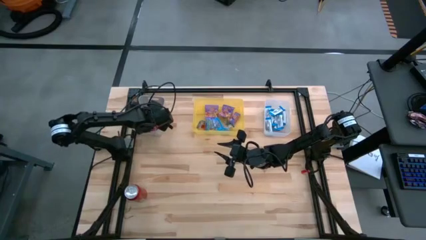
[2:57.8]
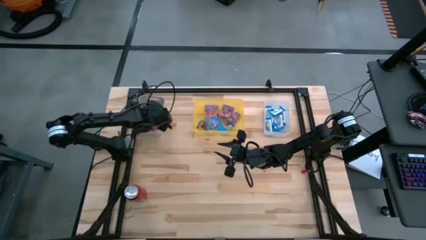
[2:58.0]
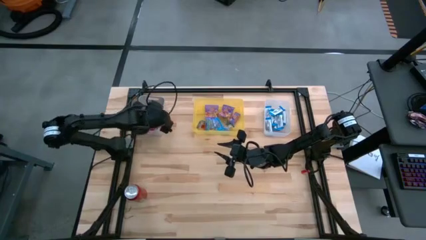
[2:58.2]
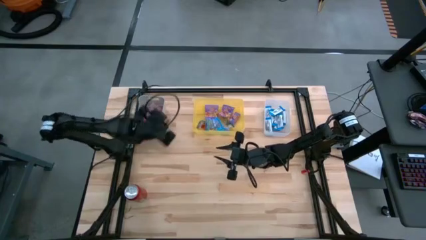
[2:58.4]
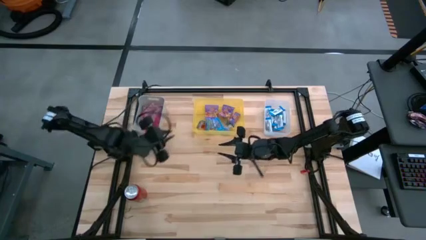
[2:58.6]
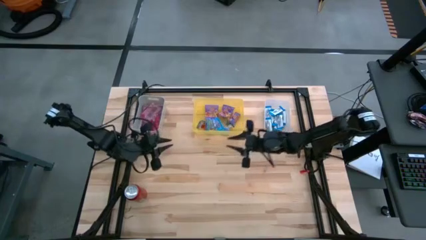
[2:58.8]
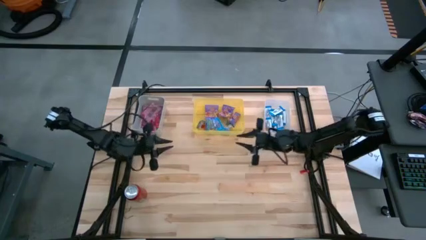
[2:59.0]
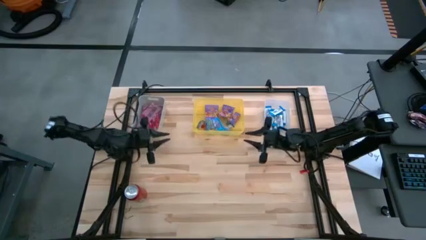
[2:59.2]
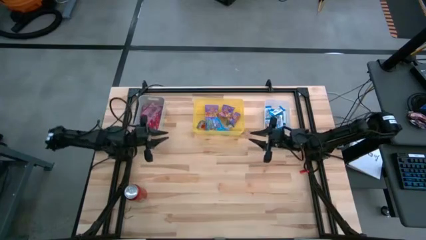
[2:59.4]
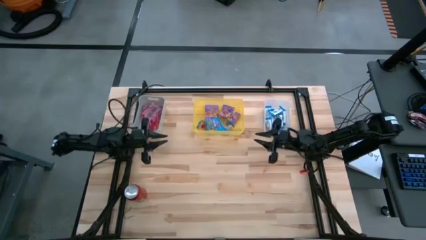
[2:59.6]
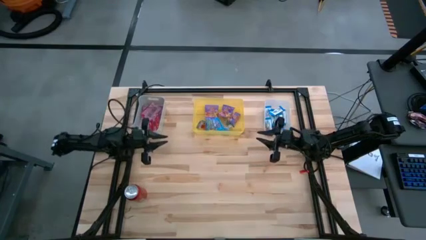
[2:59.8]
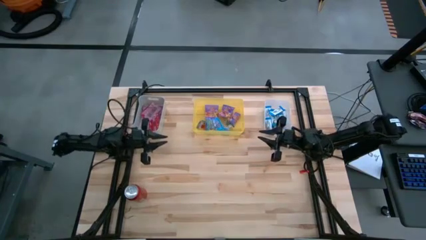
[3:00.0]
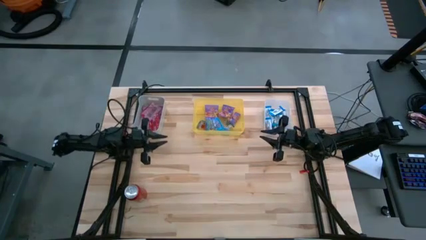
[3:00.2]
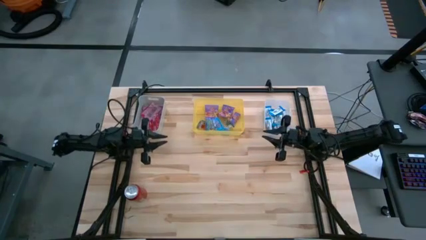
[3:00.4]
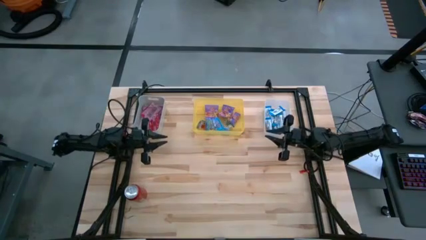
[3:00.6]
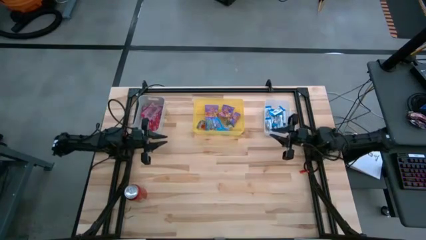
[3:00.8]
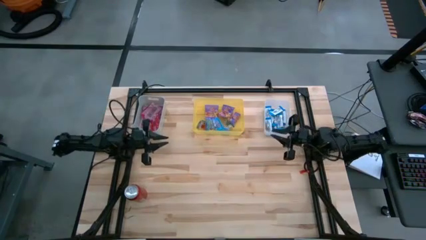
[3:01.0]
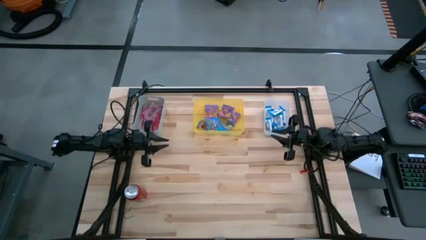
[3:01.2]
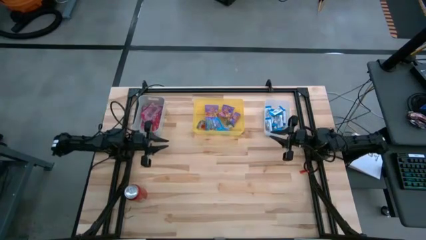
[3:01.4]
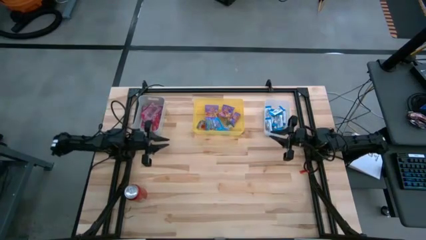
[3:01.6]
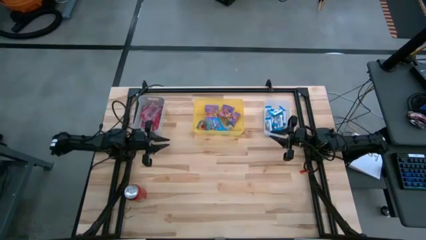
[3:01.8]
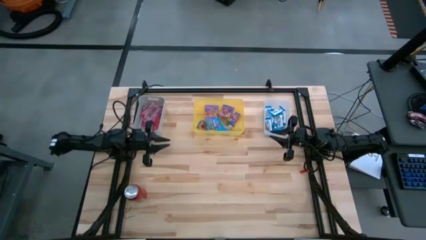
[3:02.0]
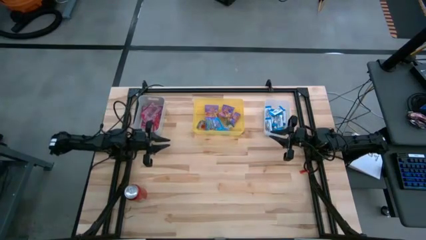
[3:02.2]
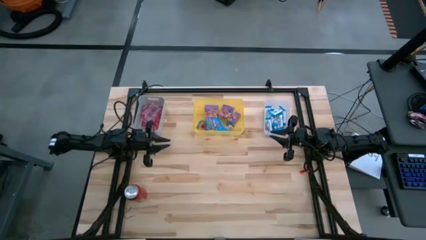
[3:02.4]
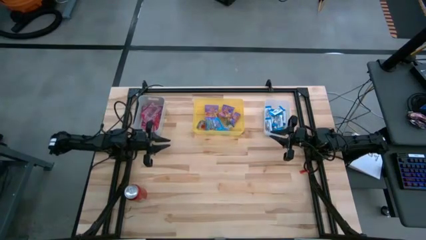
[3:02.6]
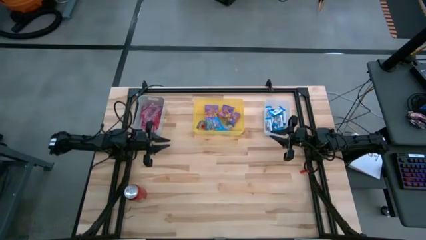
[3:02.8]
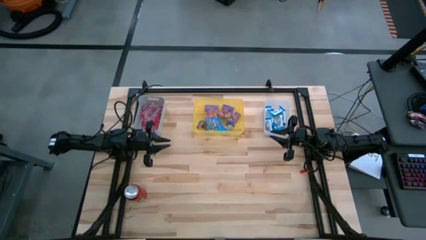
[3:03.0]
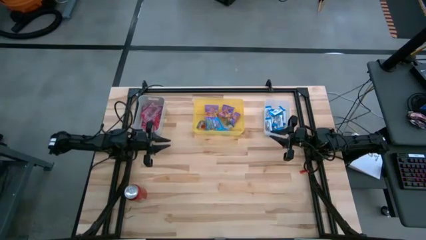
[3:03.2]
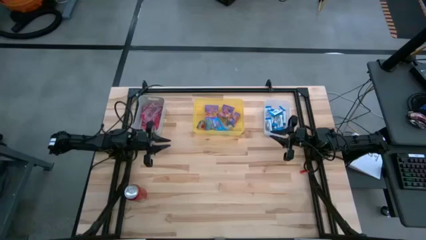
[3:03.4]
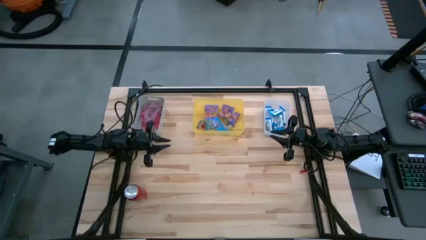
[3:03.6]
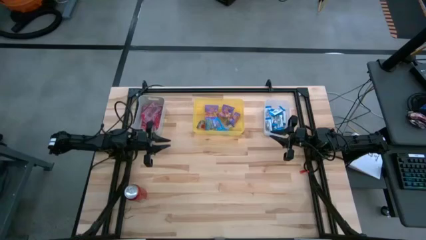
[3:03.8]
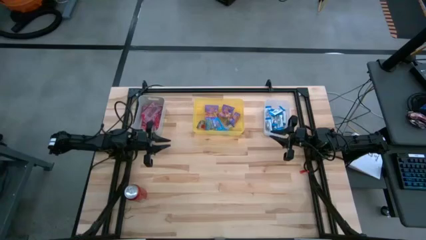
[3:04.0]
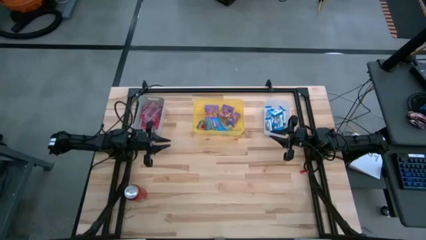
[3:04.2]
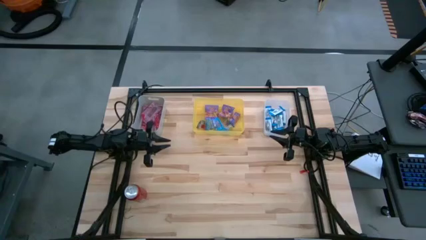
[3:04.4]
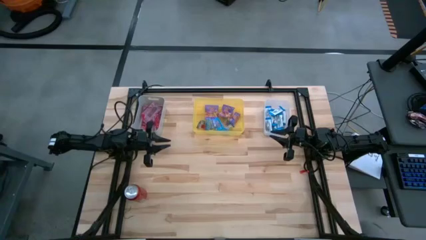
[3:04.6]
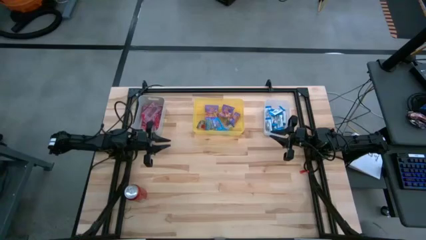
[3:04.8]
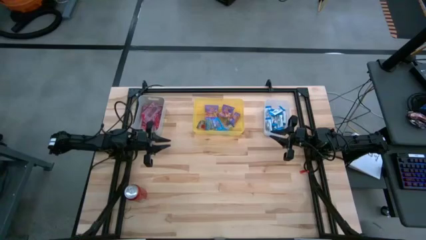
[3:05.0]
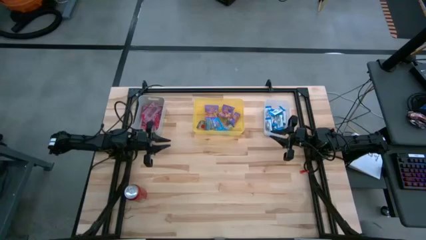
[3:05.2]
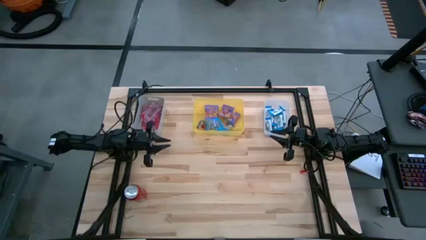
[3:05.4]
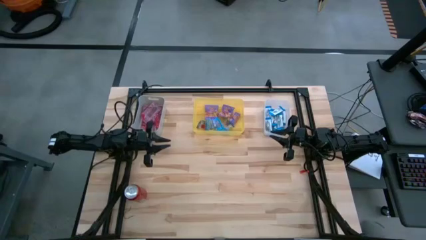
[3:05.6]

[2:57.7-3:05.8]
Task: Sort candy
Return to Home Position
